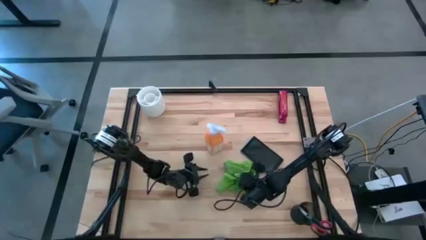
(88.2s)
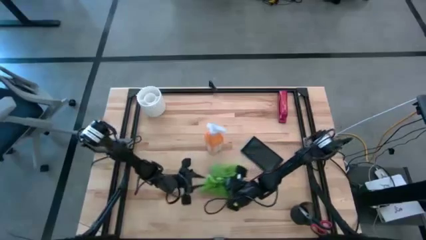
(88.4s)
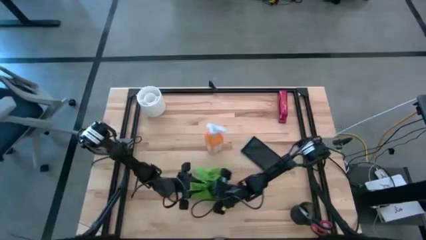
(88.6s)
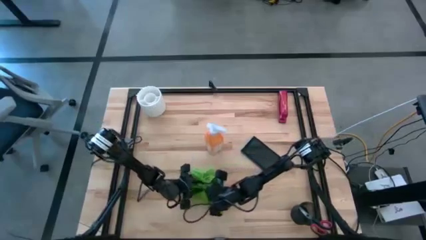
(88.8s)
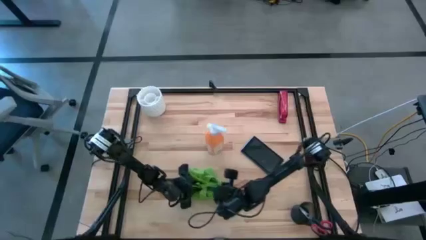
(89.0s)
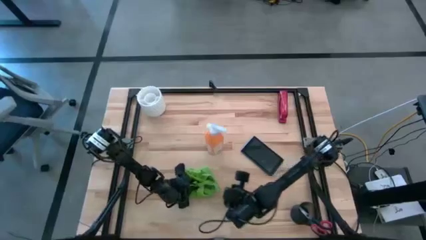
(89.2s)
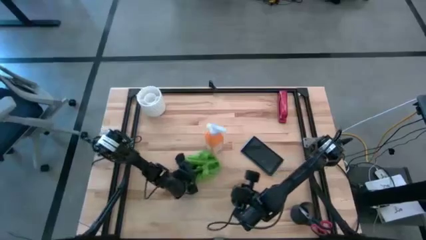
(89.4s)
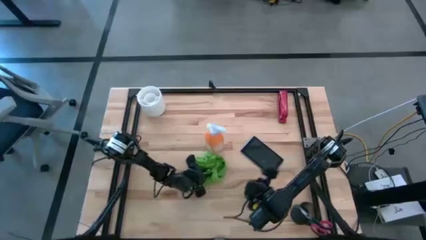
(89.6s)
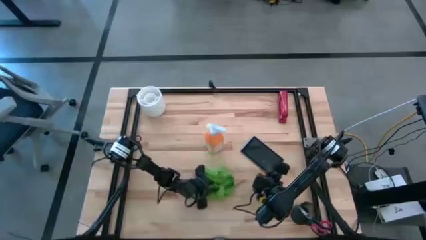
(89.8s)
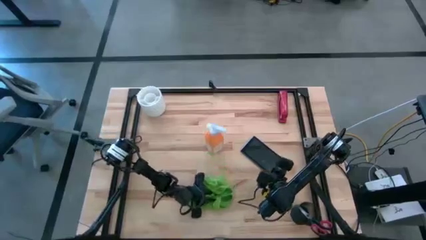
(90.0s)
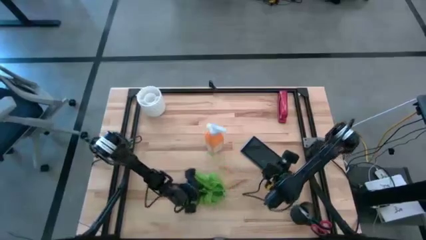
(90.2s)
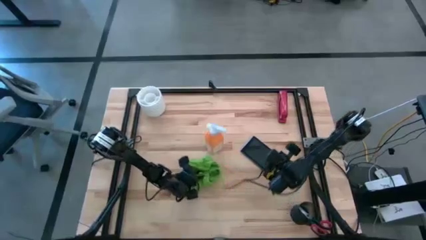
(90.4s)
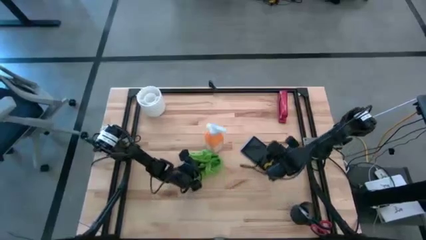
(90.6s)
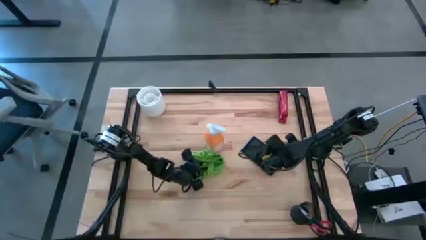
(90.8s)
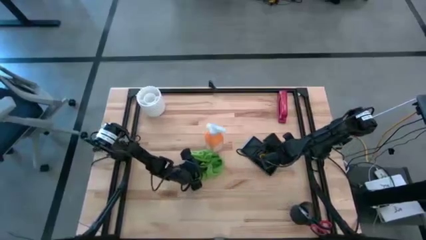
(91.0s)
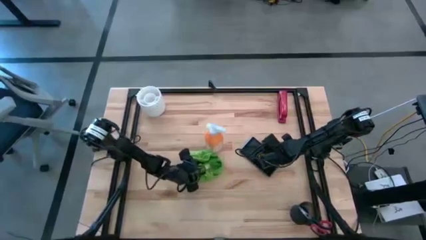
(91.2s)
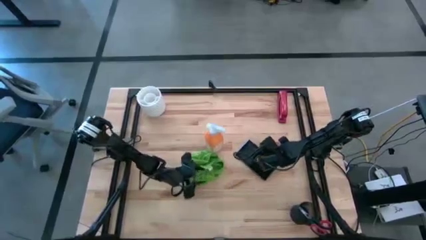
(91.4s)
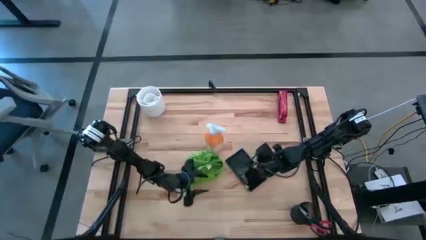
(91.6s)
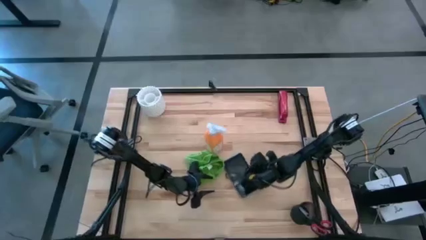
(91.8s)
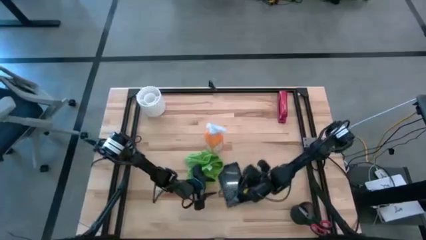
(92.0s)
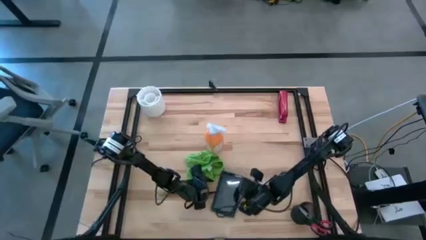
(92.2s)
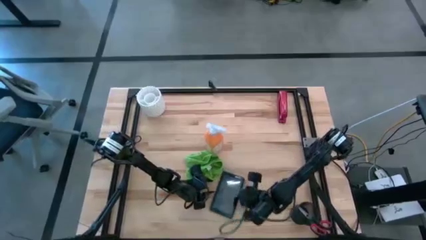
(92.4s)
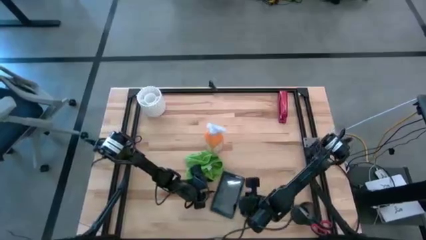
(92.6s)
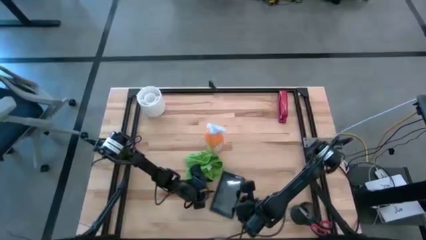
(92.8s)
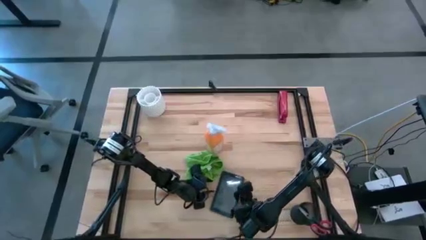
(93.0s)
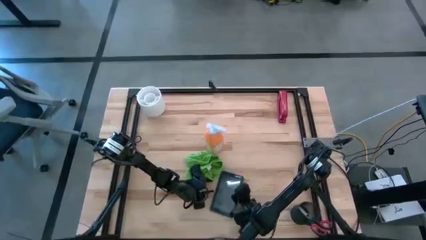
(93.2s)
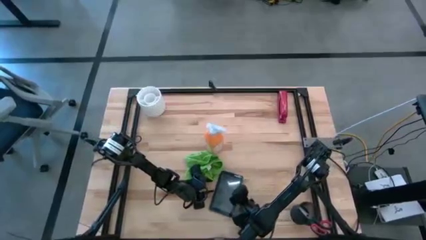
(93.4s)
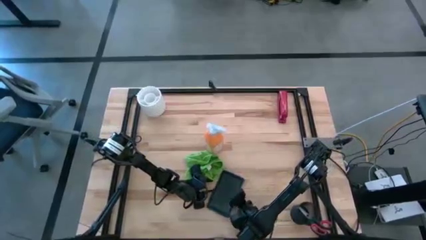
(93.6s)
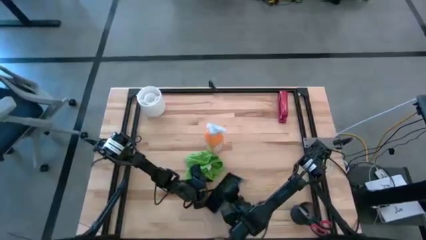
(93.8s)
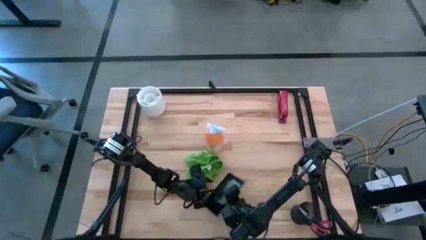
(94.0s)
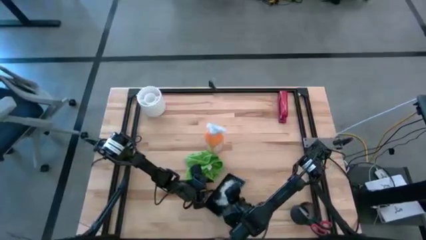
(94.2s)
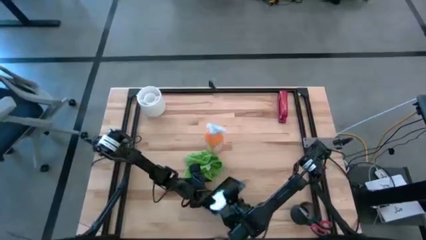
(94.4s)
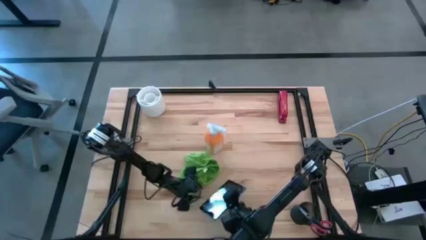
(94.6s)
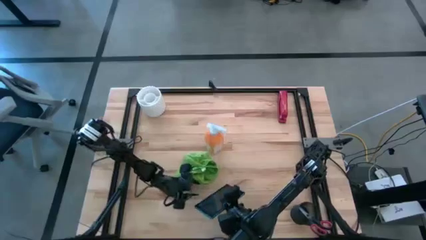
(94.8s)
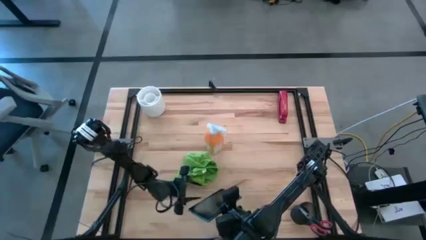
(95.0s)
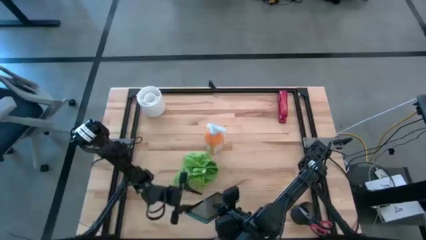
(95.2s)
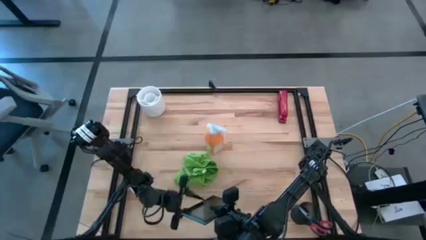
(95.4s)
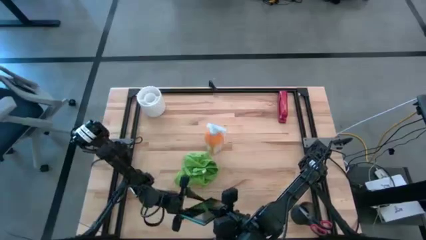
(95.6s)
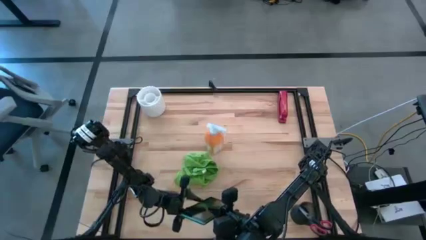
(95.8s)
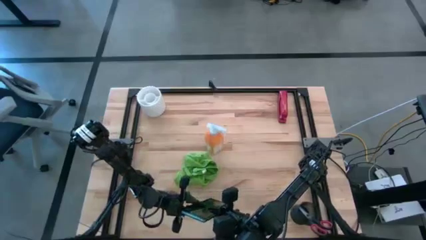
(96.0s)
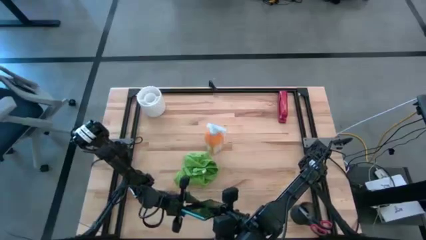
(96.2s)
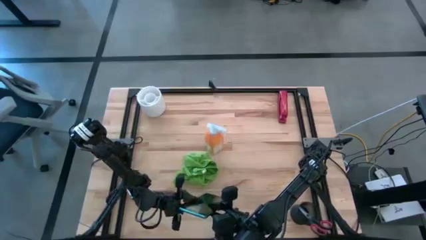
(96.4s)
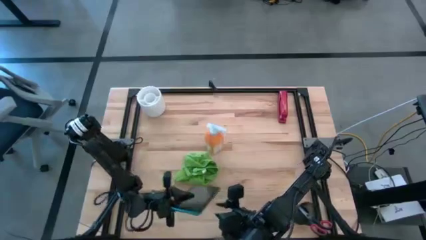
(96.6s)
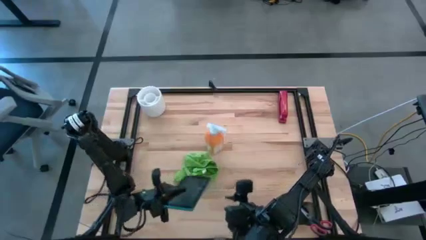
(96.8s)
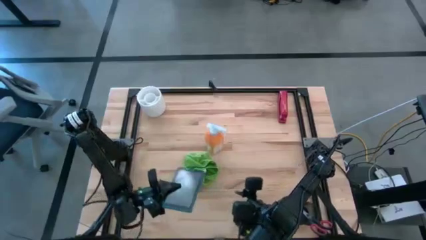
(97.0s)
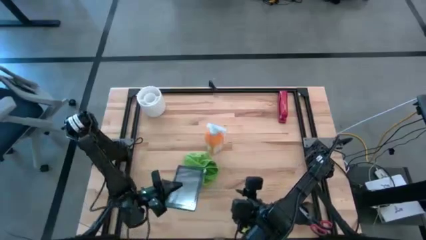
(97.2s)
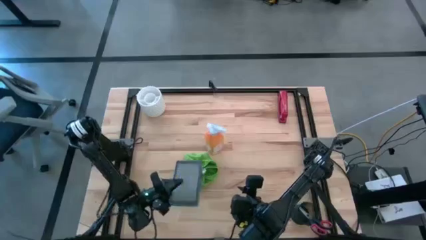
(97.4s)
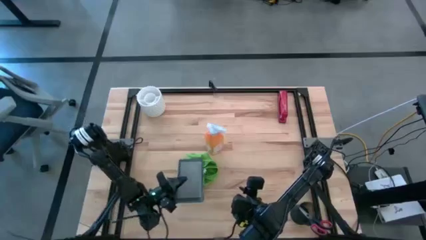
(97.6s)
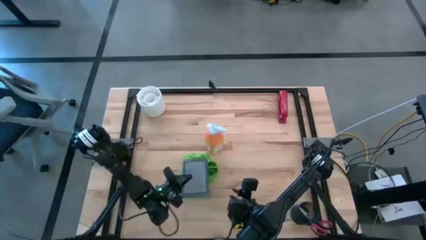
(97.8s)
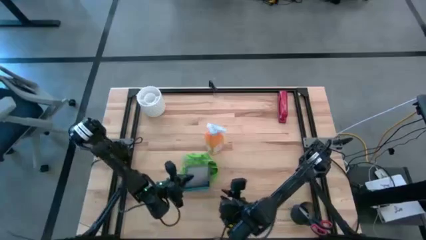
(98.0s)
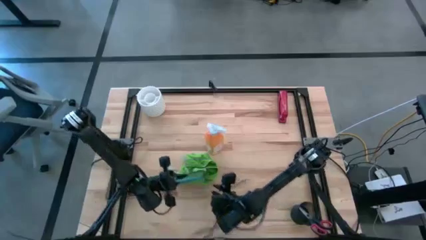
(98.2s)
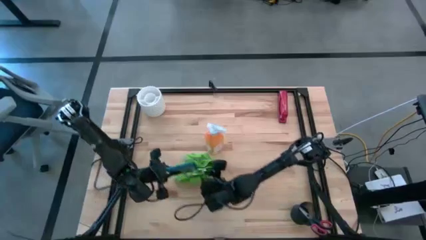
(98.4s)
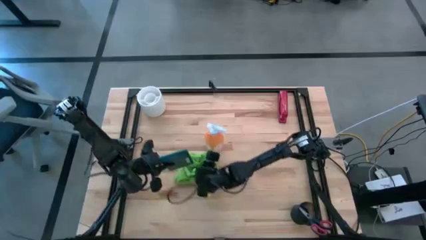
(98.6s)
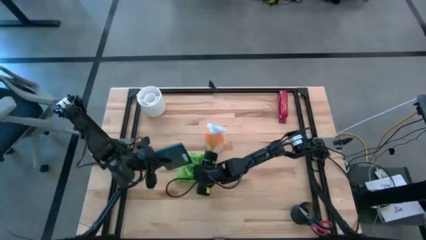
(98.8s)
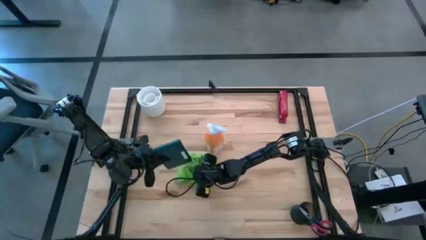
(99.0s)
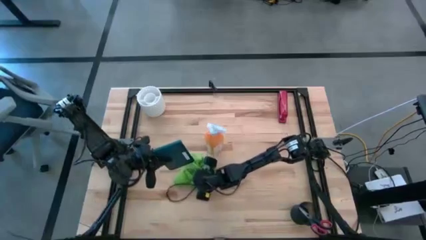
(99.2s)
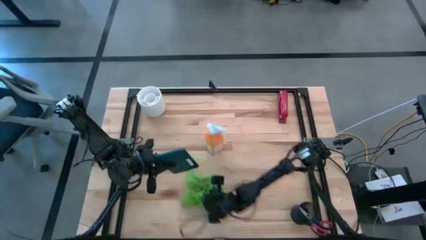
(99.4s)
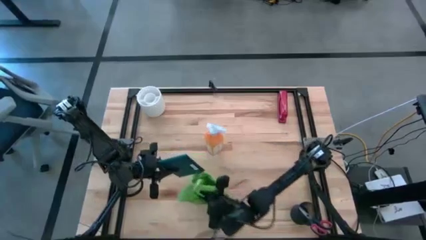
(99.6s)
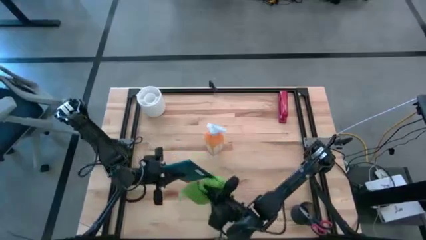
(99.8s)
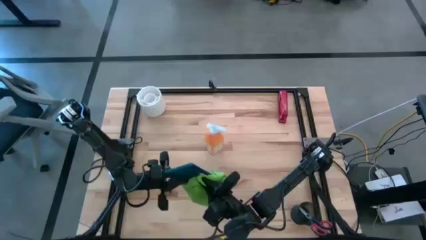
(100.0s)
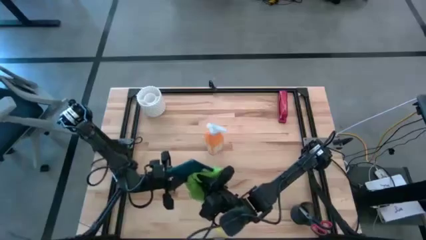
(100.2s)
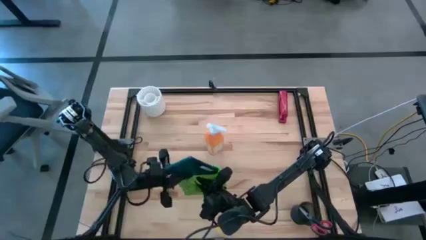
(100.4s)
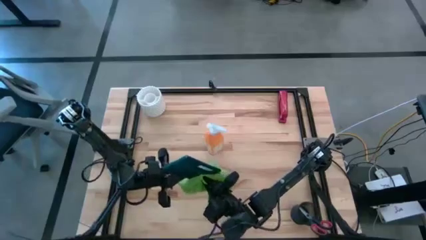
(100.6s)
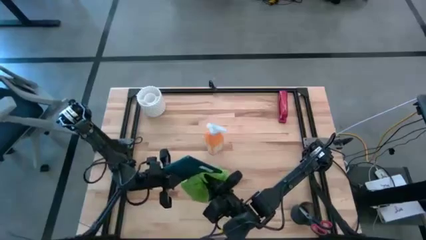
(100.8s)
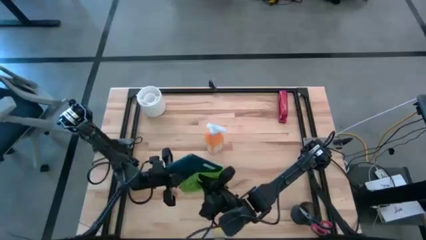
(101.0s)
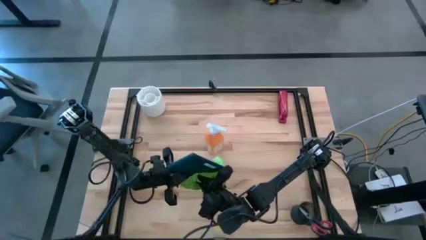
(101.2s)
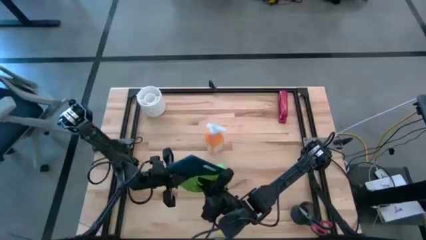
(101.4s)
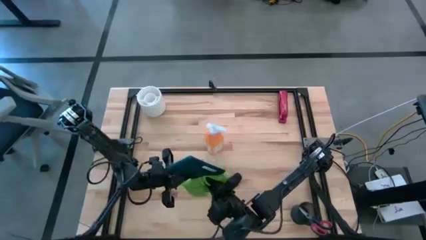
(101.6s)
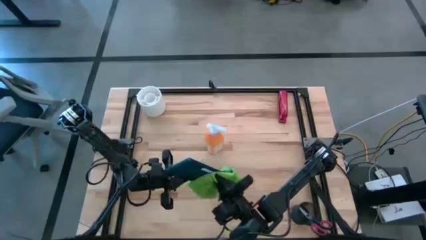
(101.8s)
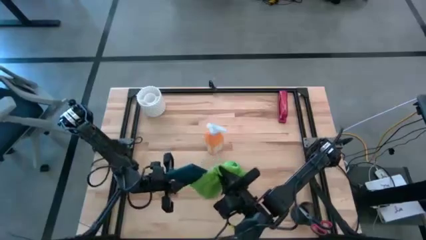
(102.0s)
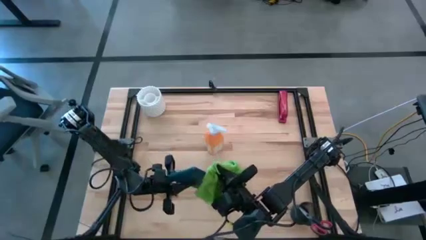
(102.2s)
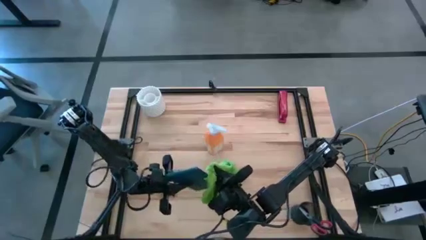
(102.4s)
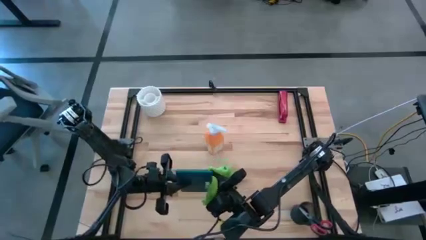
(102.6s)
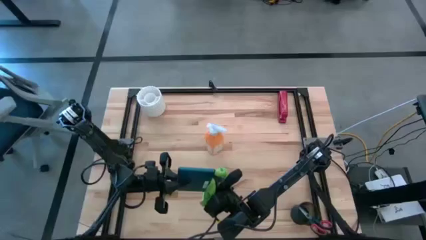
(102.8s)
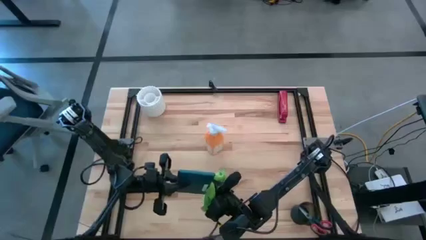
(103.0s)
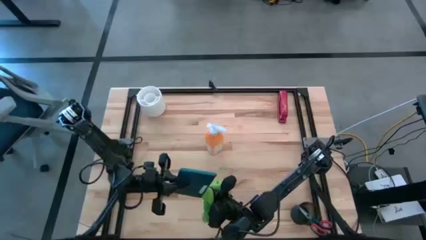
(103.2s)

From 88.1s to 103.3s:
Task: Apply microfiber cloth
Wipe the blue tablet with the green microfiber cloth
